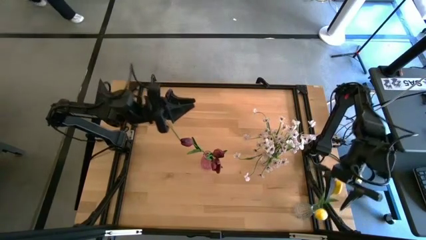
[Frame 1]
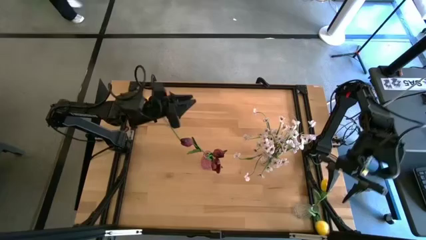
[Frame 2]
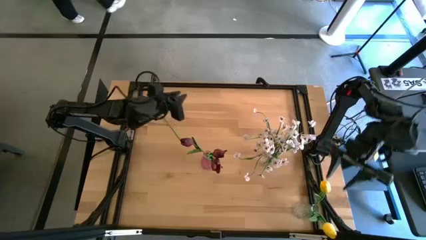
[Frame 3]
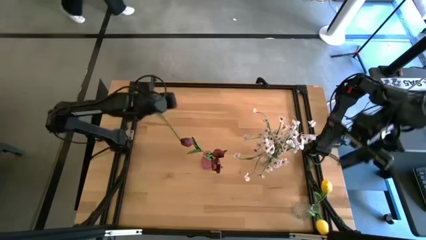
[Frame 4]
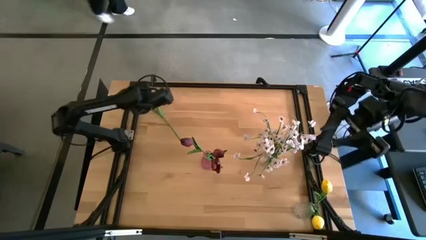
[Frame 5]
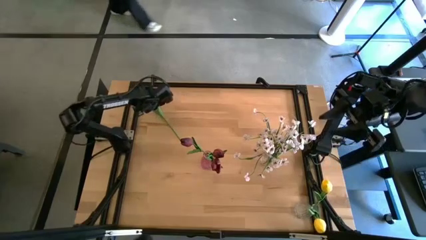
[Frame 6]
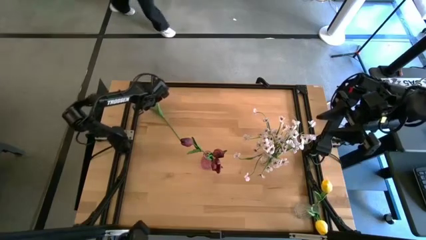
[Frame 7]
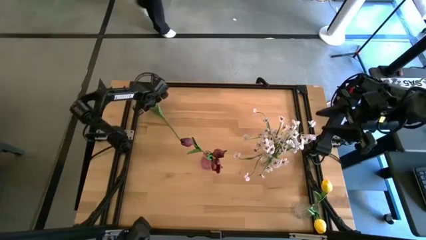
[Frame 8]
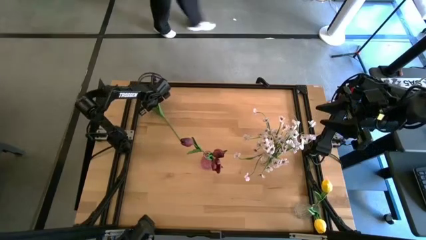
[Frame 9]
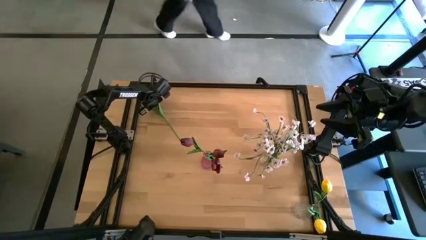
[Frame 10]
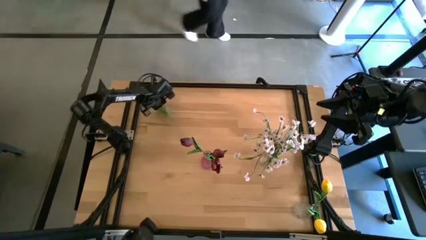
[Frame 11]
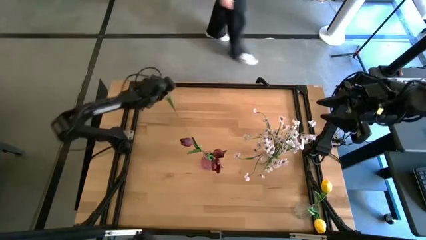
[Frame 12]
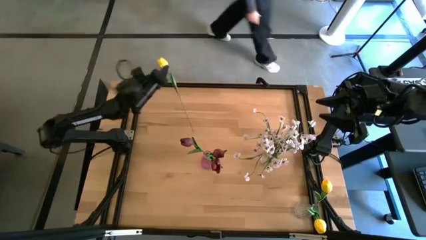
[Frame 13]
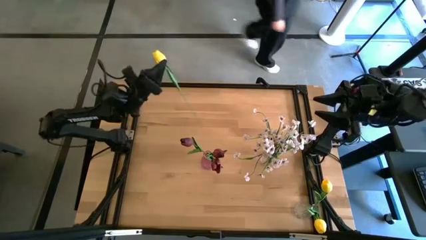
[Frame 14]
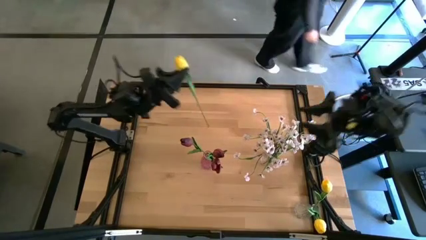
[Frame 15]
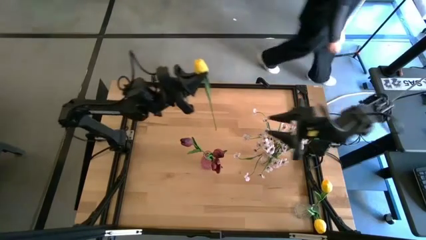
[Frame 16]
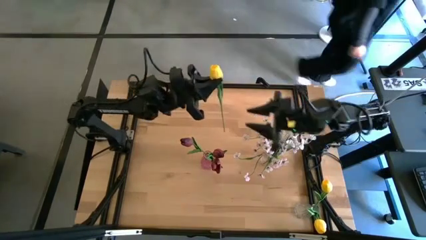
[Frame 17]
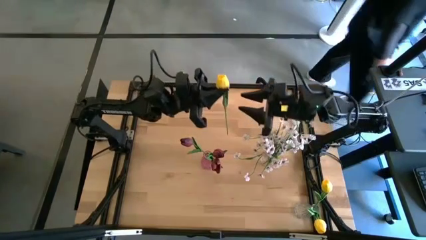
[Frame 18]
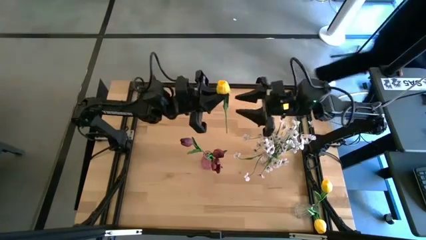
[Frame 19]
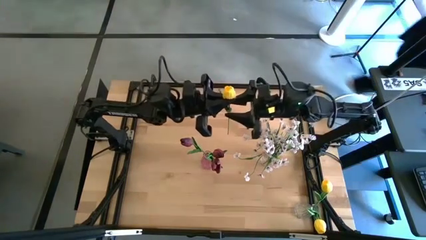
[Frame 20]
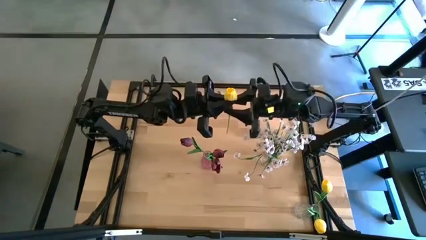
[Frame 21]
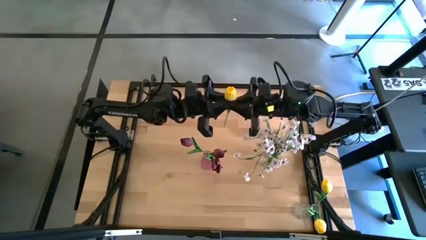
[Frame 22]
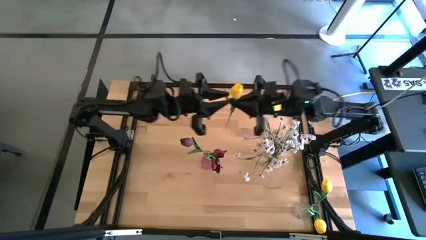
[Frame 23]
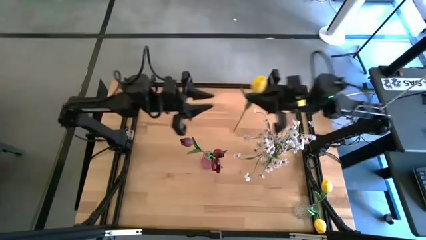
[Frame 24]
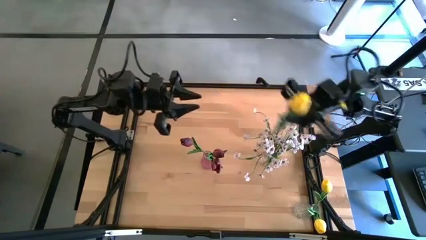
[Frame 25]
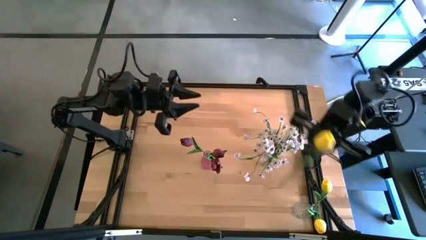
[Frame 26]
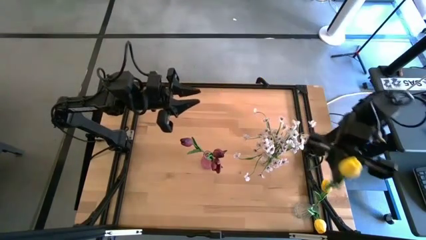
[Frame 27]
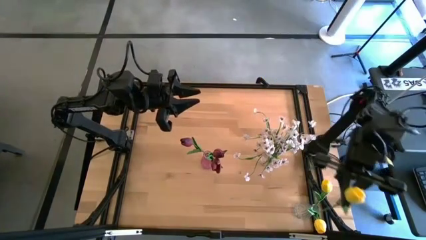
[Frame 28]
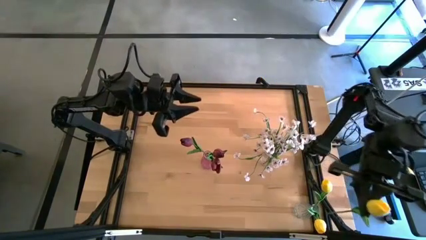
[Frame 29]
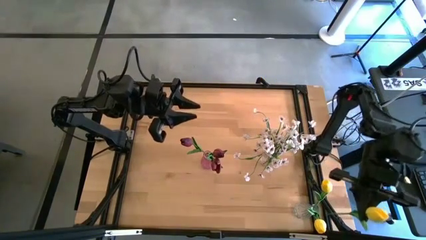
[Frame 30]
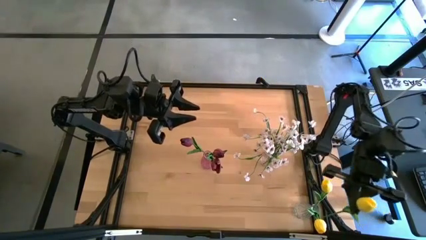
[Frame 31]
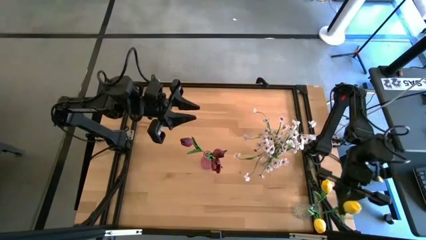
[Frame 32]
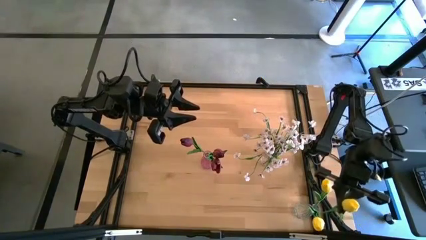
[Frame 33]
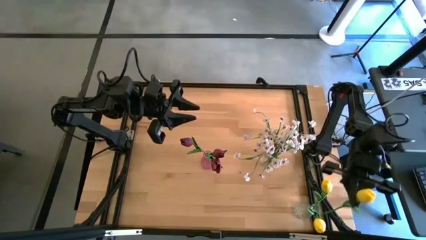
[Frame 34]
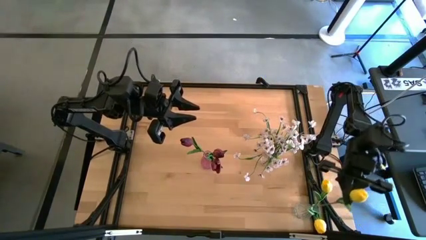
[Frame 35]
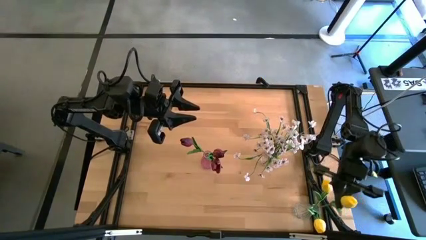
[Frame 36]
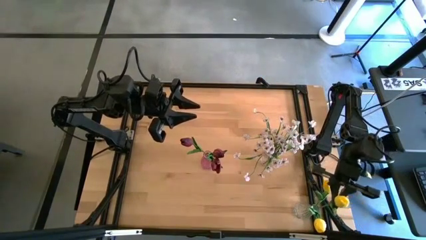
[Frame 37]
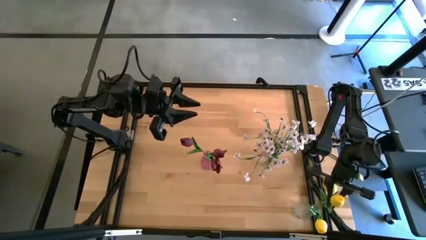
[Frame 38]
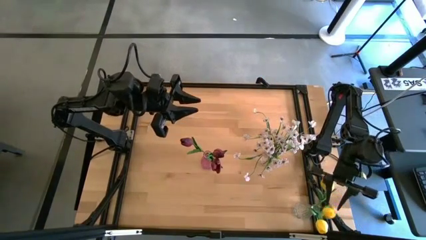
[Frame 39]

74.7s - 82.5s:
Task: Sort flowers into vase by color
Put the yellow flower into the bottom transparent vase

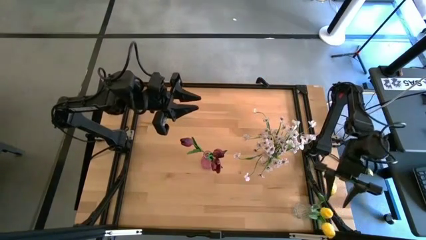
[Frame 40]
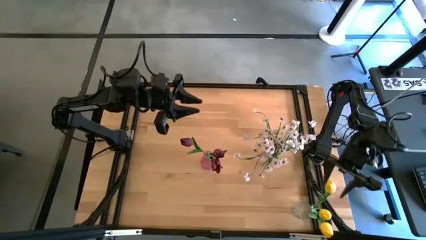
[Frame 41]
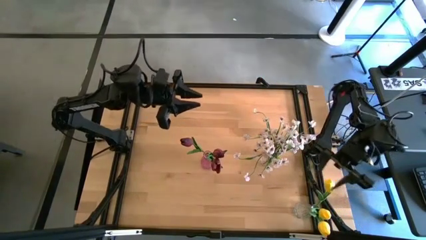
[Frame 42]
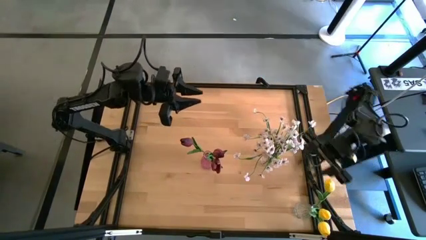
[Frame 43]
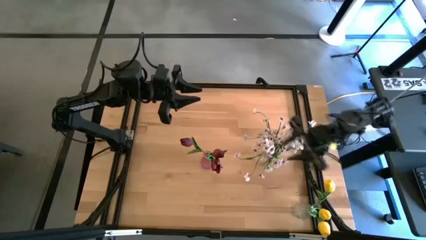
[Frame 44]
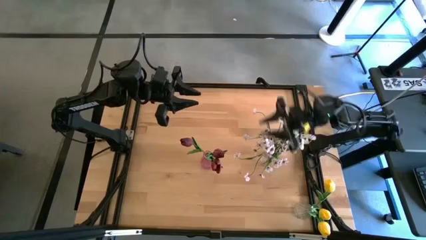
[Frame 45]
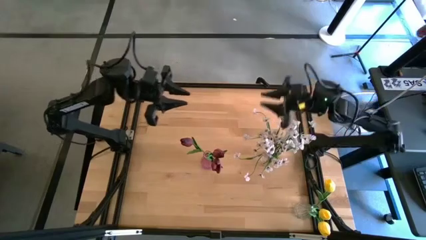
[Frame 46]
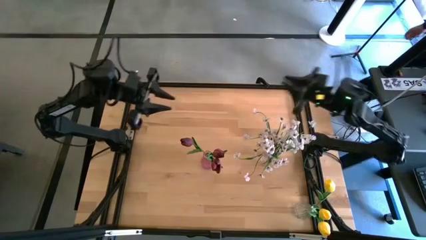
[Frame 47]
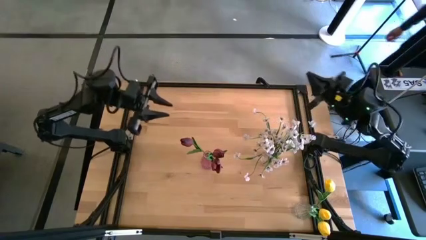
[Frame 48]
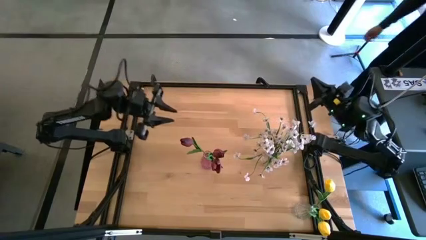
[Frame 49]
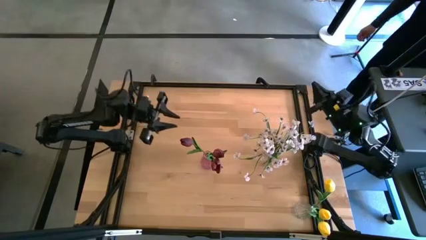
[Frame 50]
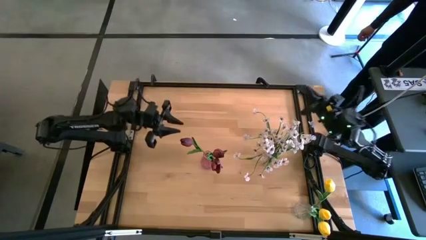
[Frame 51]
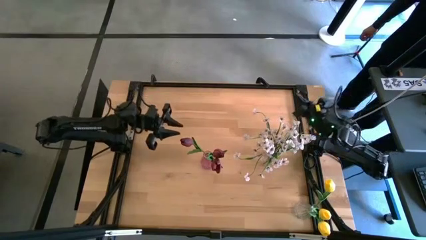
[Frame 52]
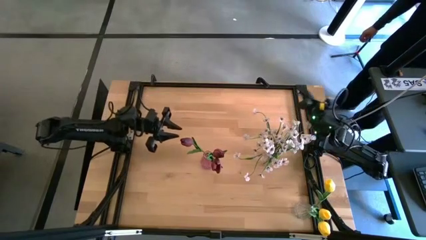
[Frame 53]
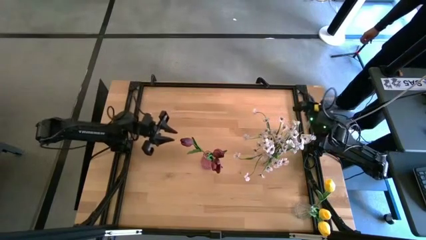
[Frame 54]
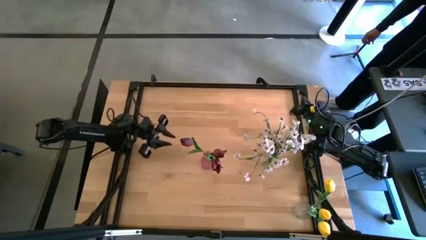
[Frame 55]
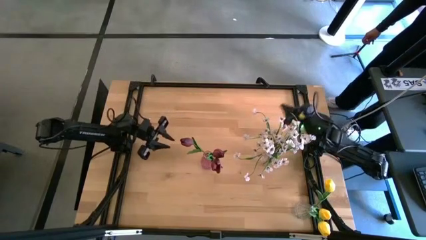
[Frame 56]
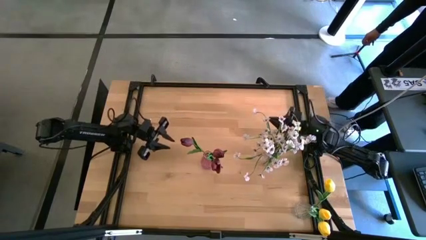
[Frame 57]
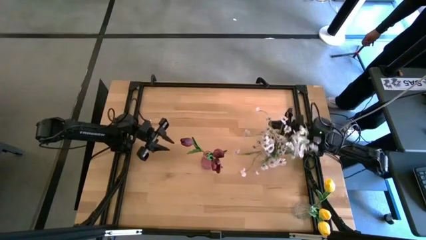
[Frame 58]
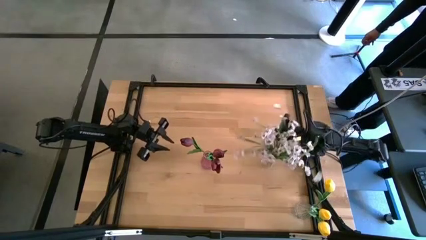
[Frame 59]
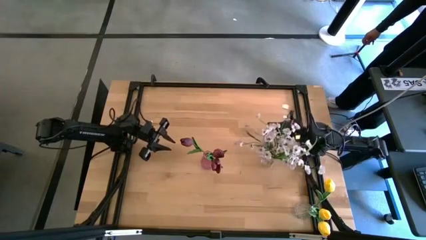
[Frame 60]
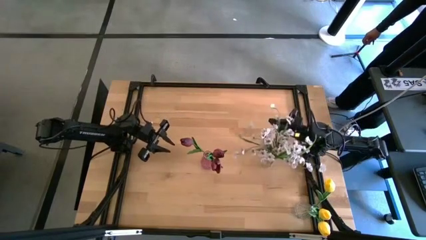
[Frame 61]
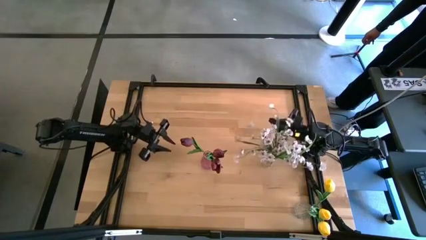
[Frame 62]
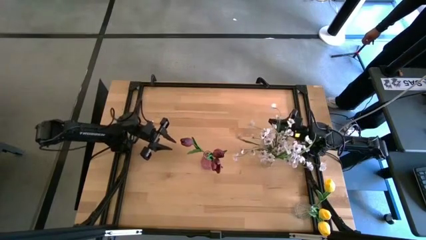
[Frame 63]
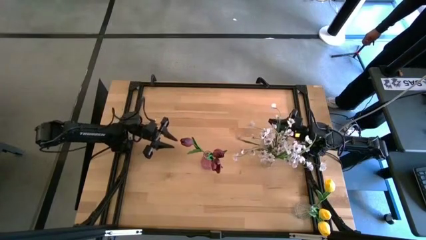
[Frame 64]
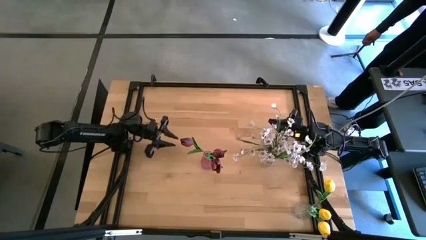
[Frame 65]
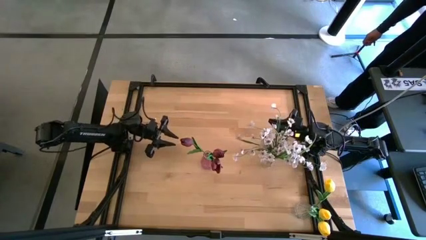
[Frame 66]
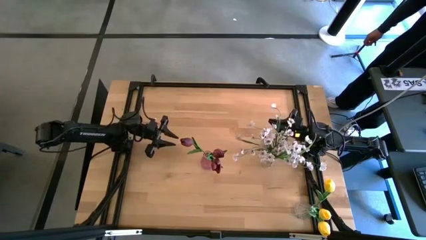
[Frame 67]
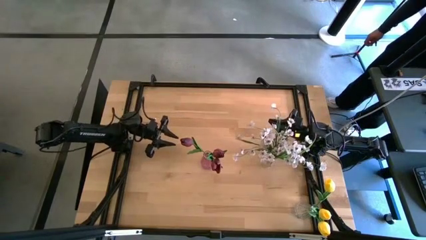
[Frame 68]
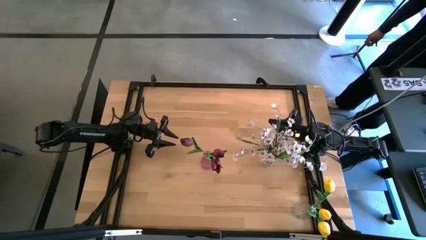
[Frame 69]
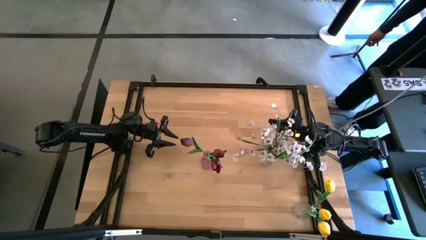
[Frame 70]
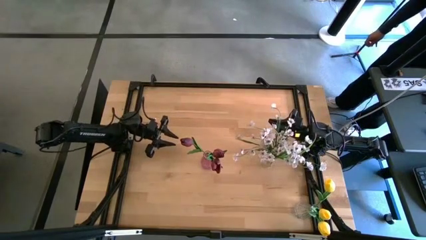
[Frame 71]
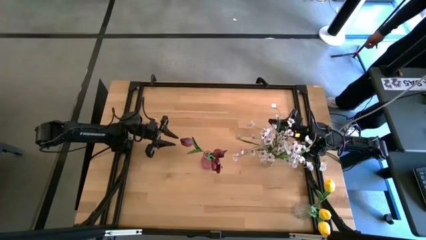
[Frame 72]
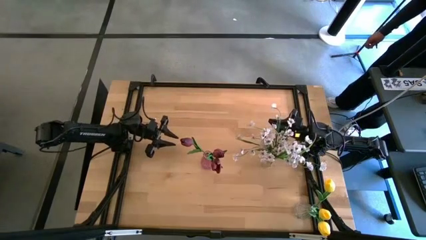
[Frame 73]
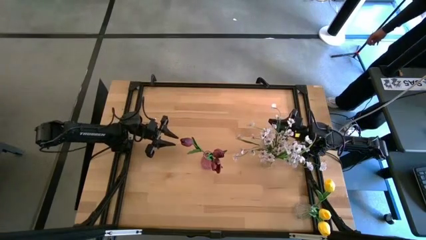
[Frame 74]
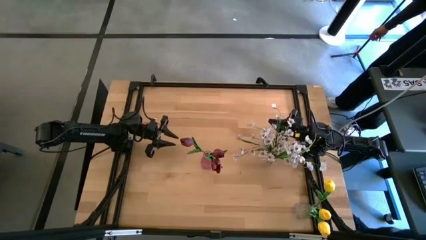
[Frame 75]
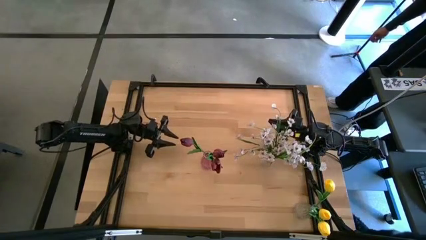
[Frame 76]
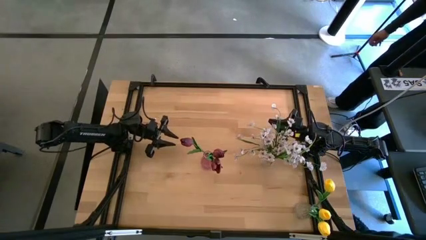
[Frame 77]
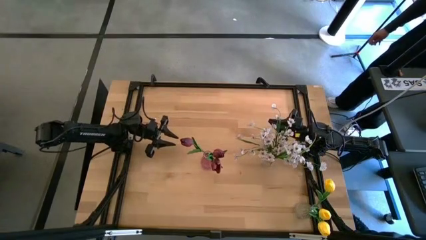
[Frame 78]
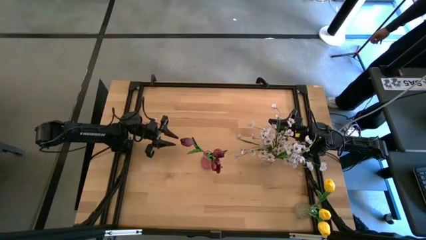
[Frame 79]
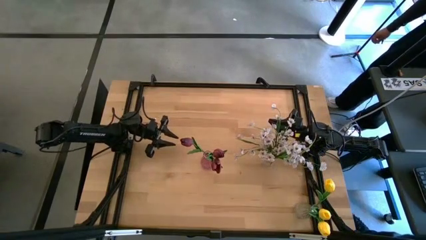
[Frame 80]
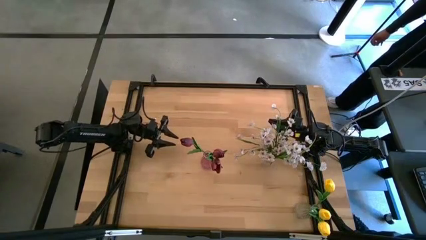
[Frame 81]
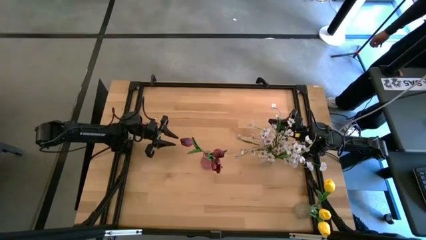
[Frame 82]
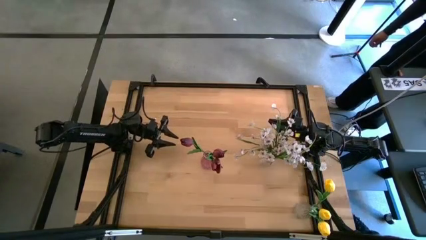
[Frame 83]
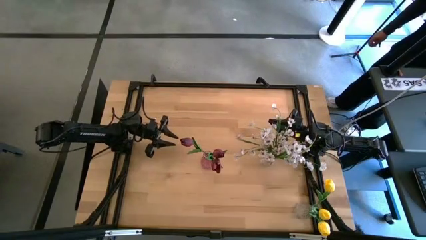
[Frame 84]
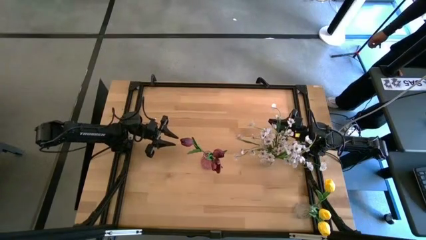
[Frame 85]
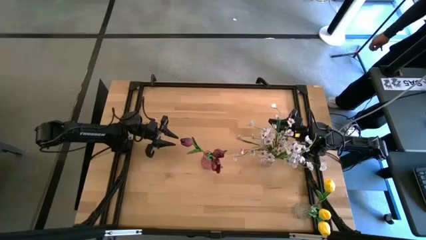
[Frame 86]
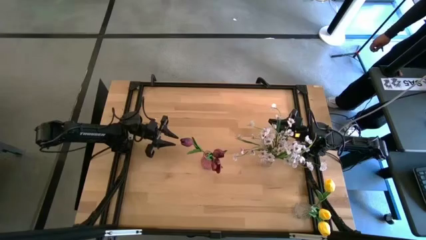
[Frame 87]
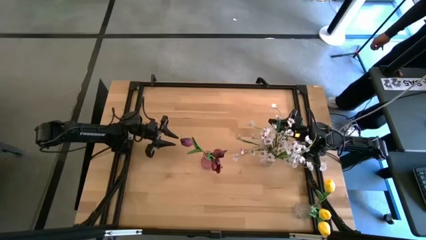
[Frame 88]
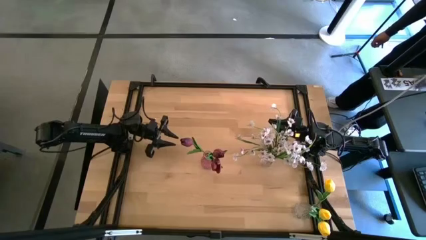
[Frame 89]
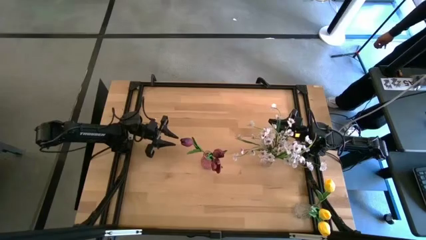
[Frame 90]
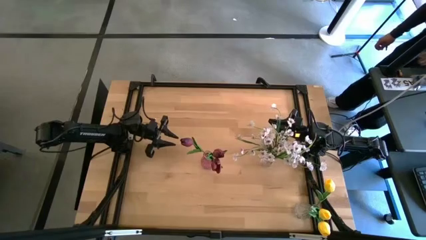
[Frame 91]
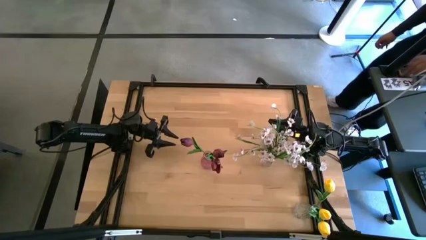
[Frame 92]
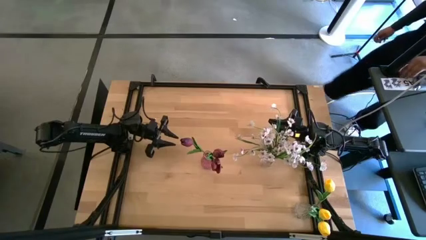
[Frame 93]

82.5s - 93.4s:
Return to Home Position
